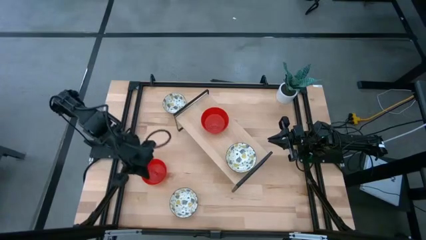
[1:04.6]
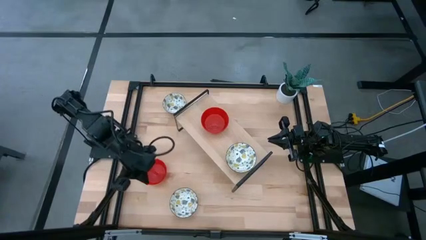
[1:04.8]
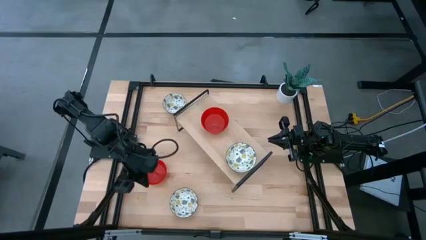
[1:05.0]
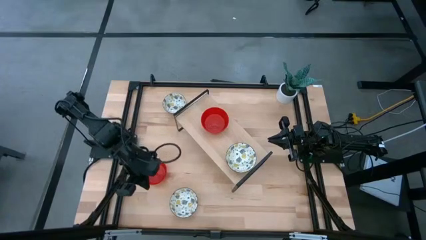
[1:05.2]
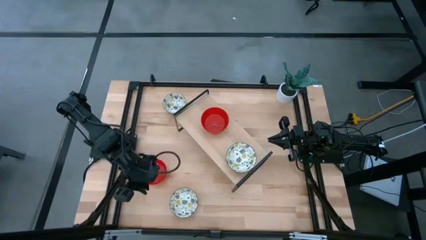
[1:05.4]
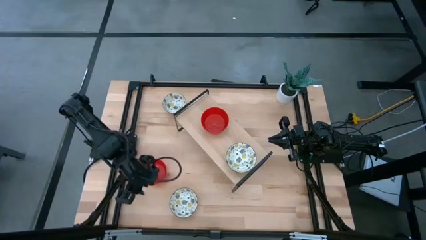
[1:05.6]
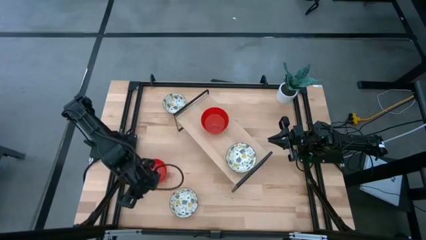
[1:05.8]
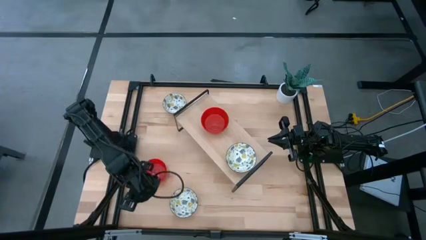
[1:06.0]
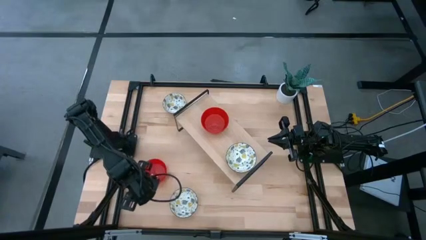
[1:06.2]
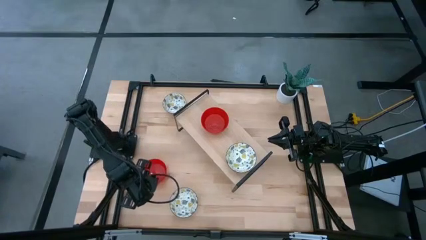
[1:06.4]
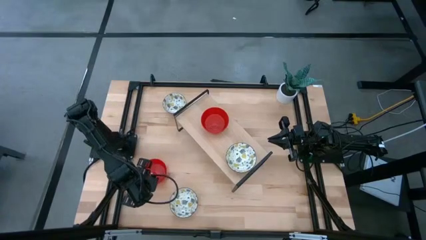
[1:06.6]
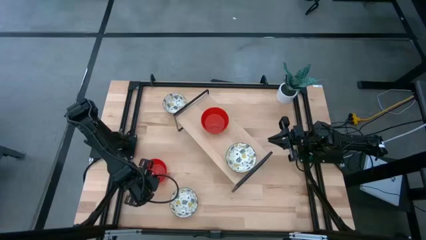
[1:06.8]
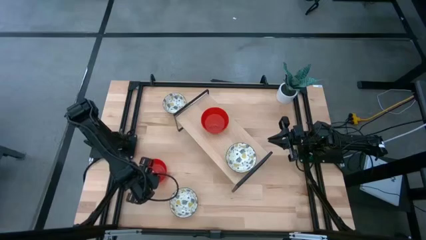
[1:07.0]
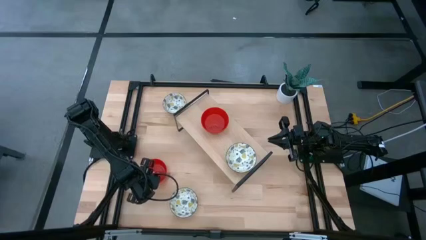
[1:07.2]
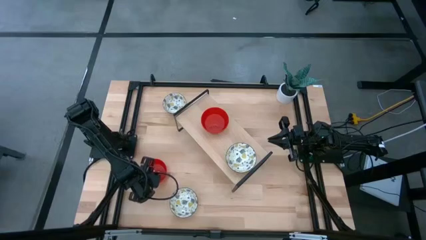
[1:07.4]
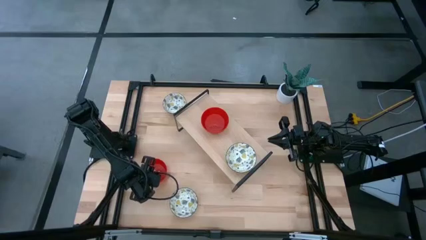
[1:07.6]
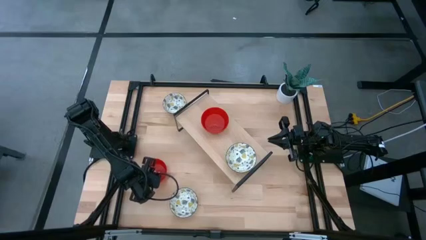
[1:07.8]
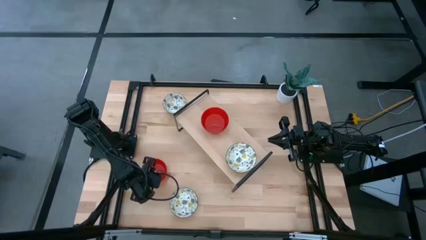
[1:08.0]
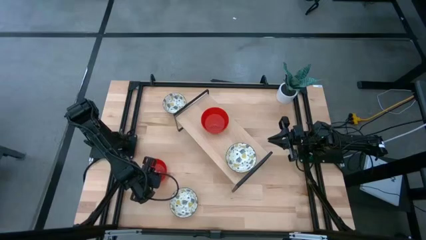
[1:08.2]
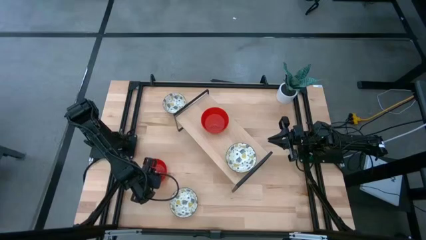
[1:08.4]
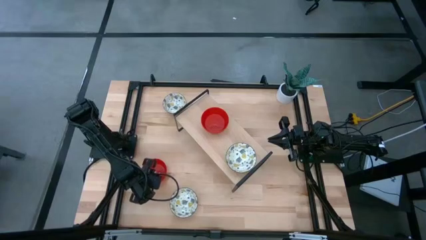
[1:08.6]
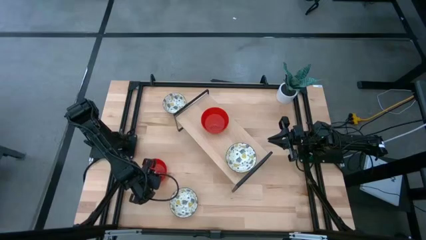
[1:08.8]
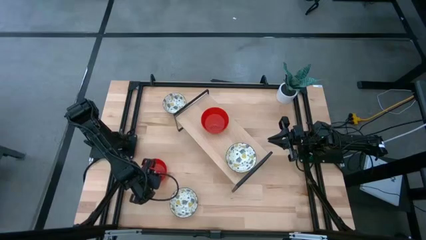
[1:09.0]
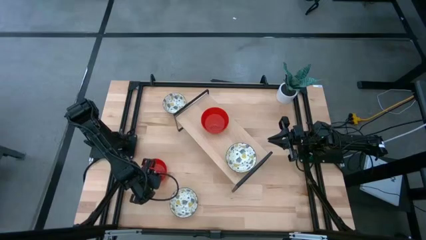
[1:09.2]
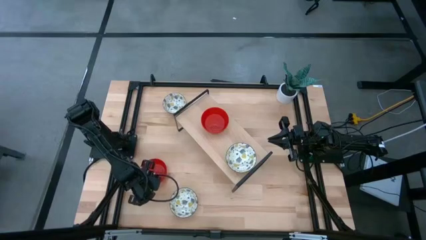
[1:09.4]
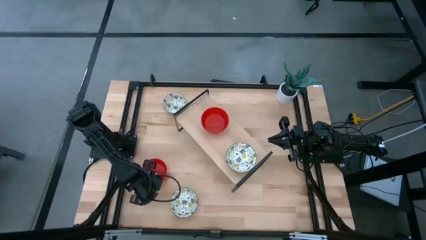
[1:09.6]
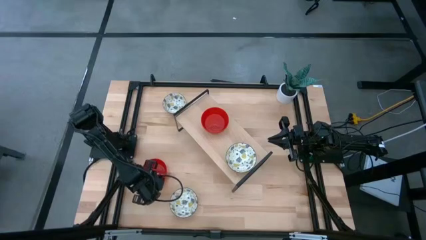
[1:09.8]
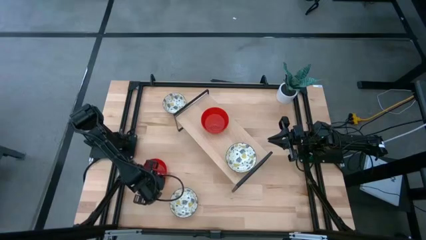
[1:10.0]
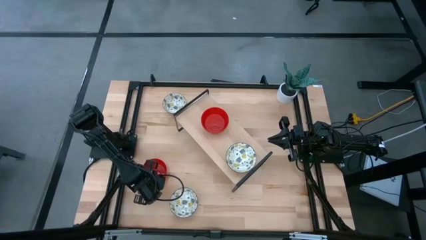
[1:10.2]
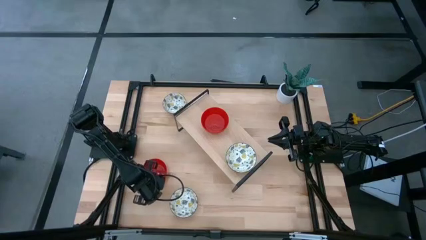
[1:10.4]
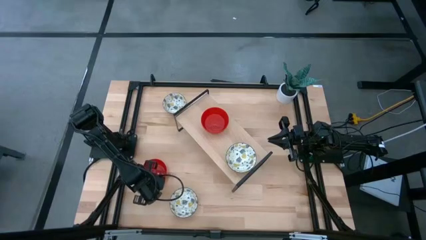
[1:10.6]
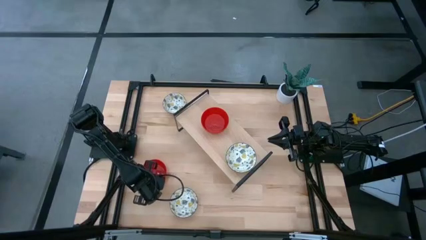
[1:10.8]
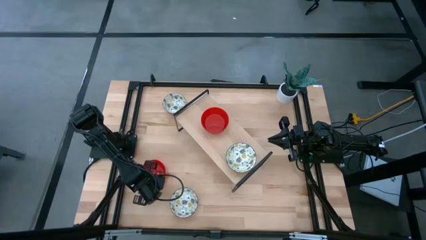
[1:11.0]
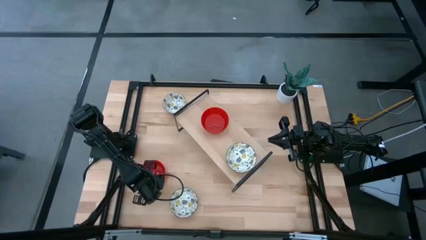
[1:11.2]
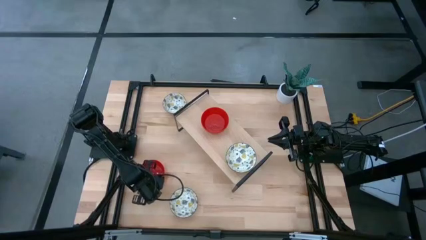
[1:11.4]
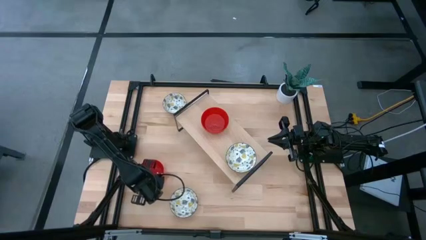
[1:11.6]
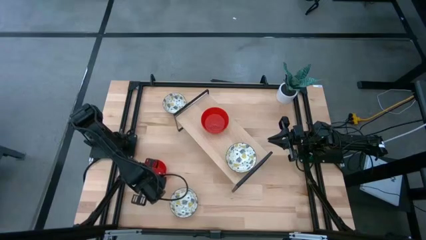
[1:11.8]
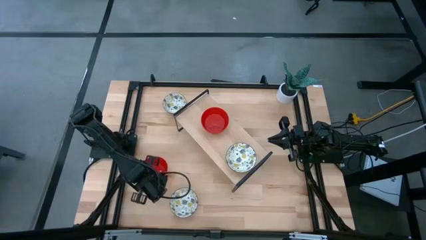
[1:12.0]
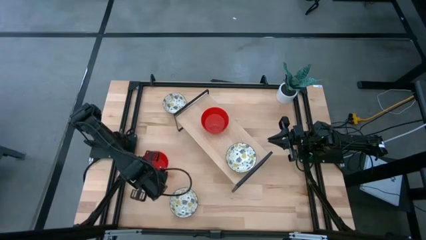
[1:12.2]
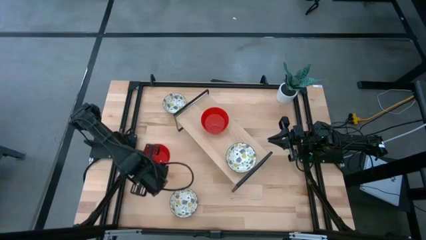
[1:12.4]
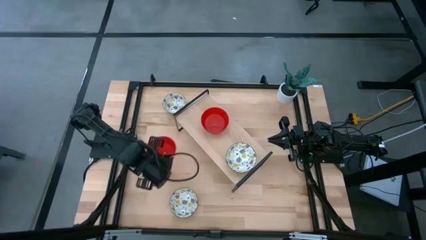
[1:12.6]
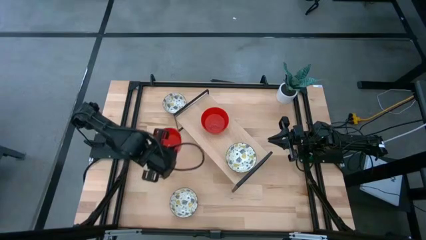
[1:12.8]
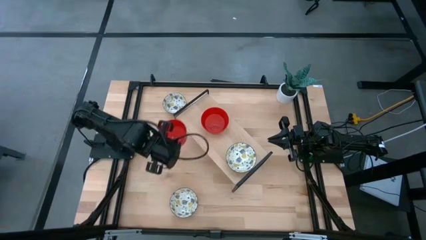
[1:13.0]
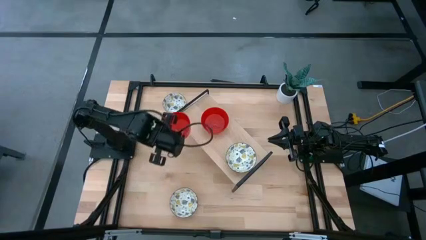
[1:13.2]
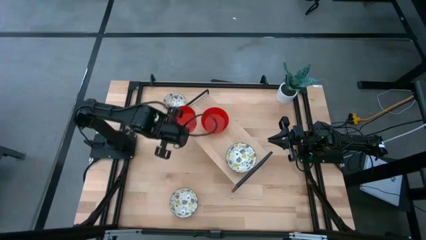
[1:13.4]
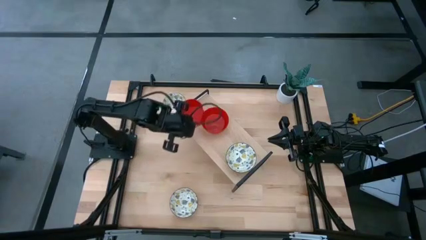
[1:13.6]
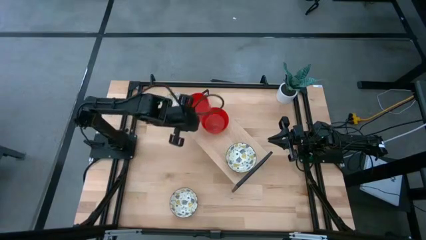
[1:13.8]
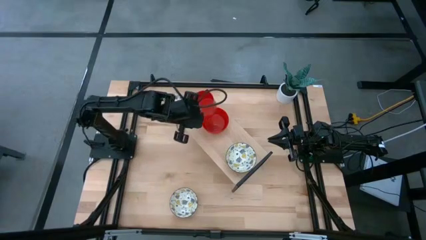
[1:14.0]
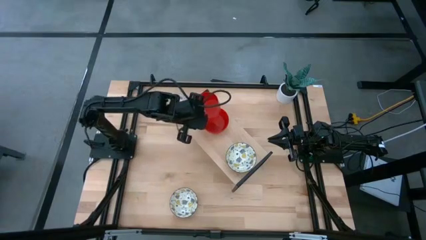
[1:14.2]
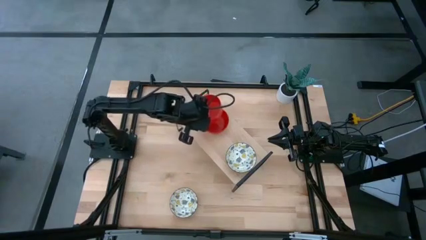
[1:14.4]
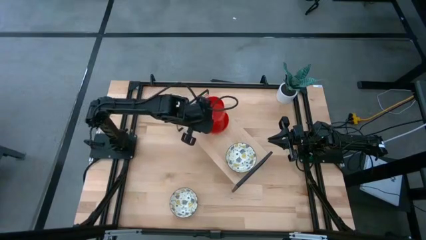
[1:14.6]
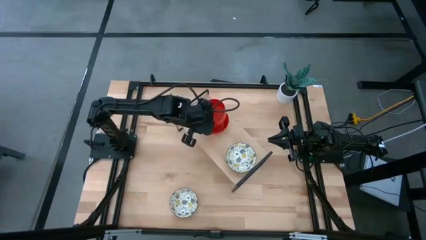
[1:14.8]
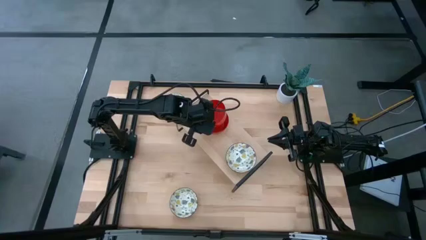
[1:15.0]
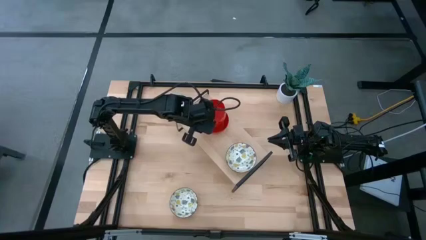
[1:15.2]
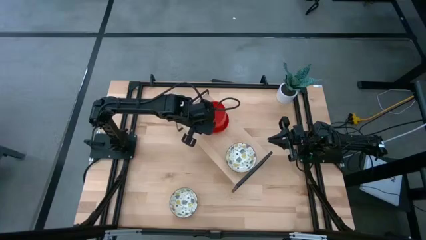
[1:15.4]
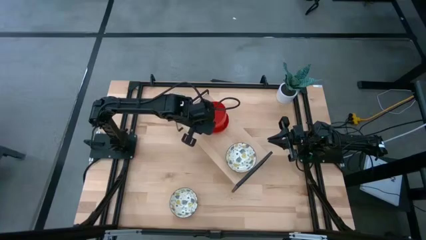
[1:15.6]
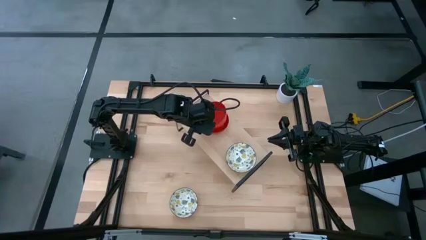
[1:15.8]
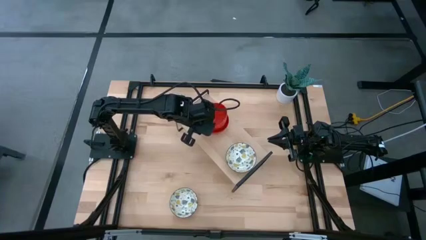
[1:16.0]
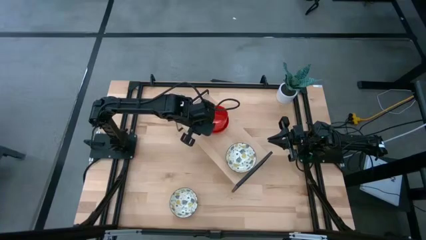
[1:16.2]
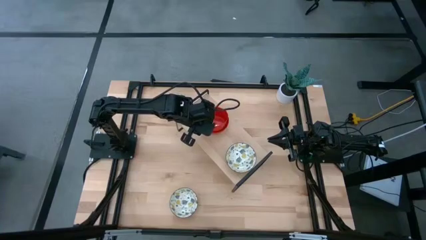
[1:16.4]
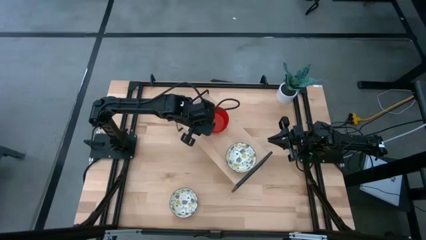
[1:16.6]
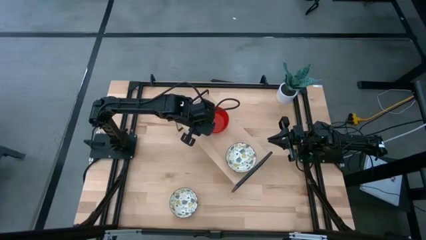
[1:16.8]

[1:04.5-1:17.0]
Task: Pick & Place Mini bowls
Stack the red bowl on top of the red bowls on the shelf
